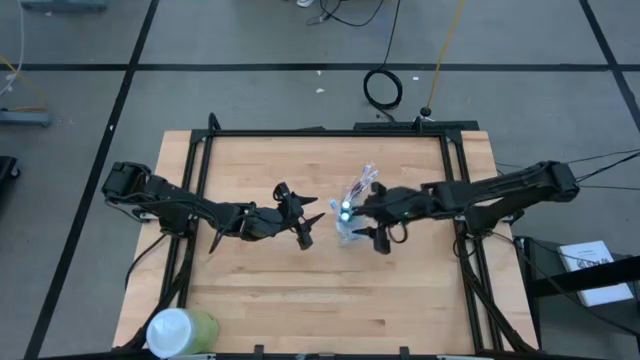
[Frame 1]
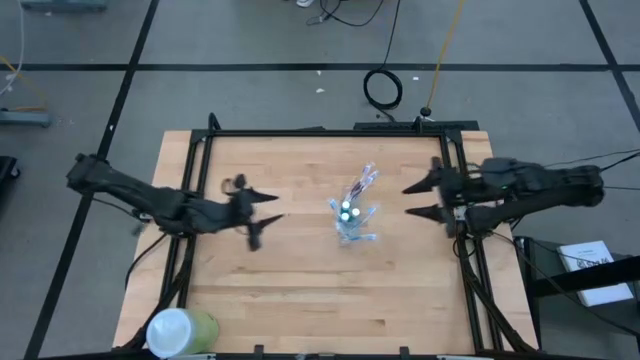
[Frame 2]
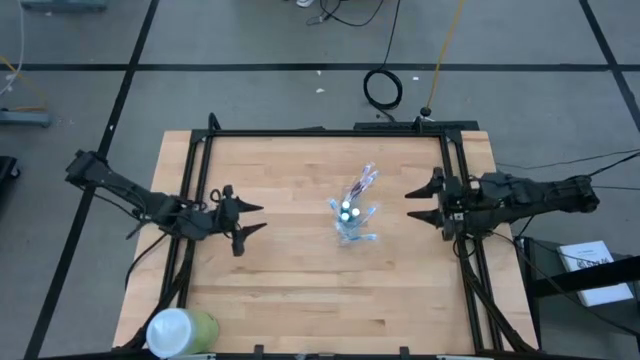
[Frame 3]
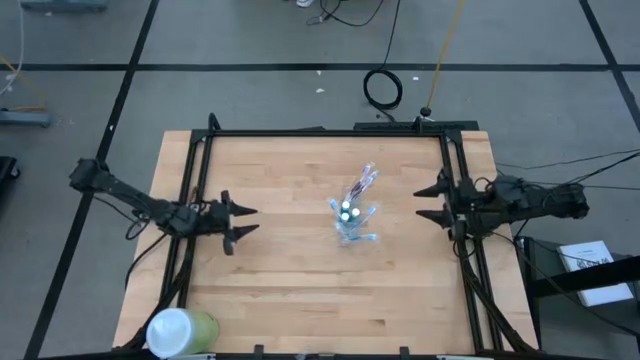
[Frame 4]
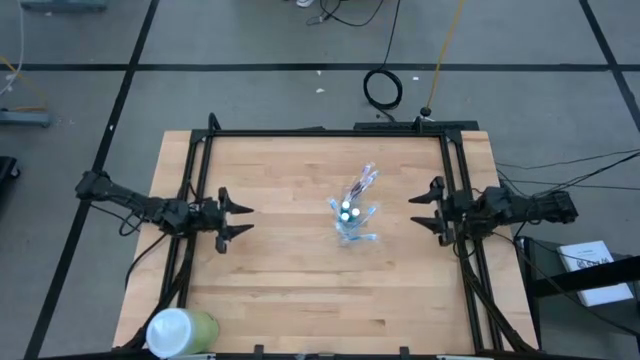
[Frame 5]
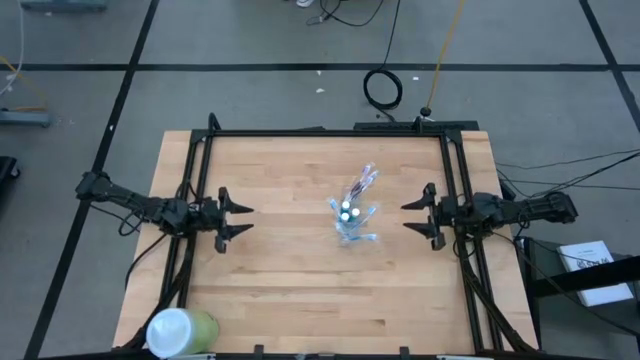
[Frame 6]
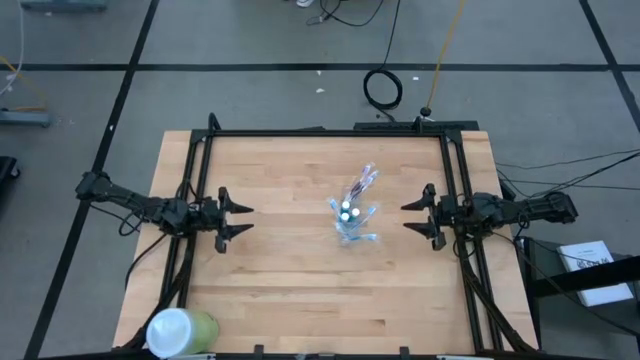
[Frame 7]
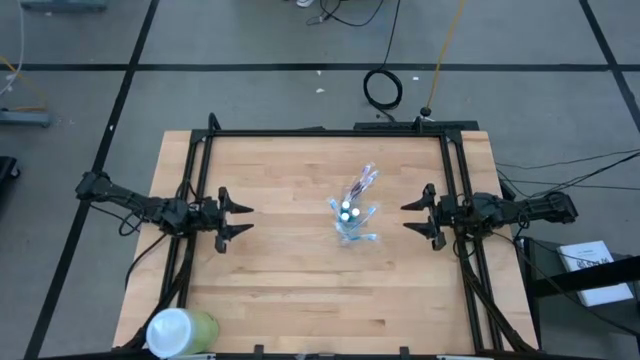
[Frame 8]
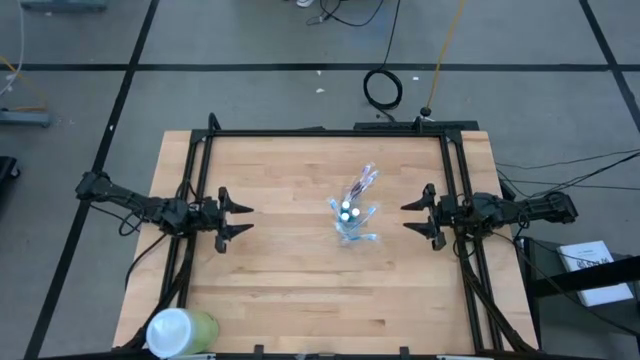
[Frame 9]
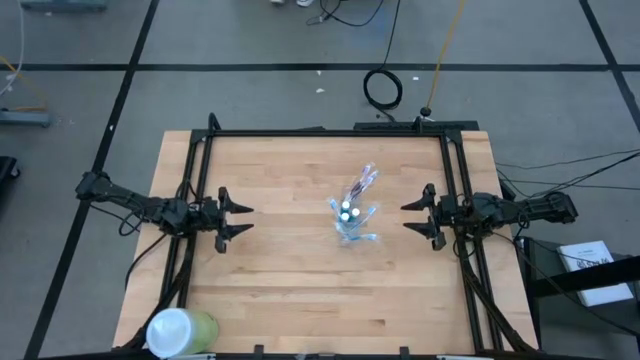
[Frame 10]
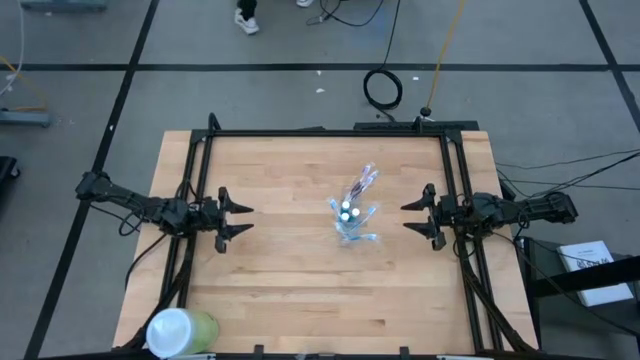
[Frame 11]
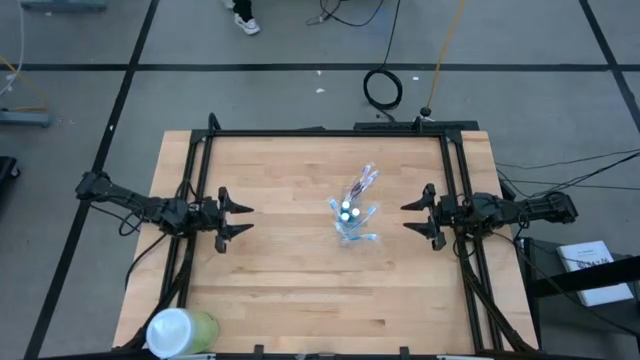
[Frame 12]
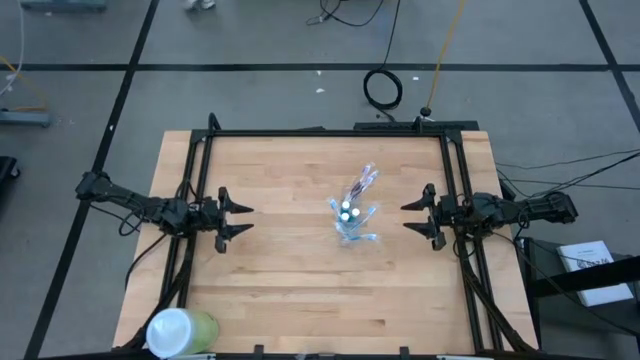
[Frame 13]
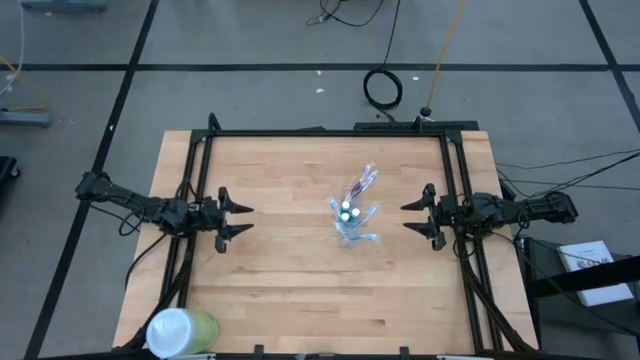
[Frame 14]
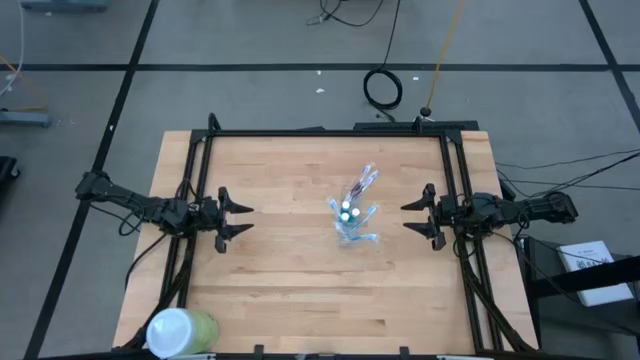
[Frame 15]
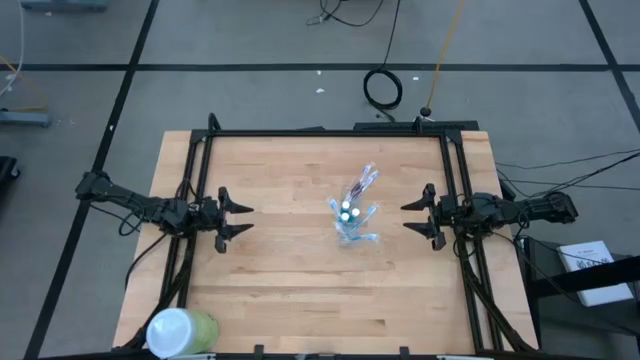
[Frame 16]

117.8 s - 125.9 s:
Task: Pick & Place toothbrushing station
Return to Home Position
